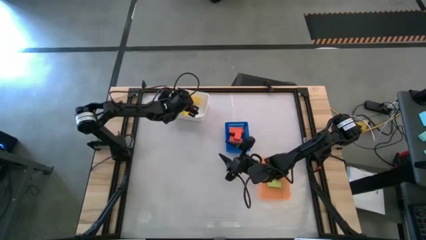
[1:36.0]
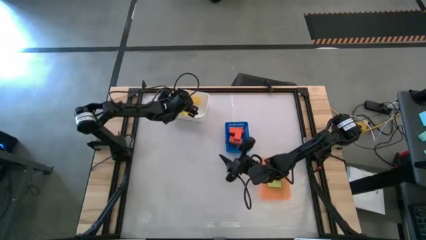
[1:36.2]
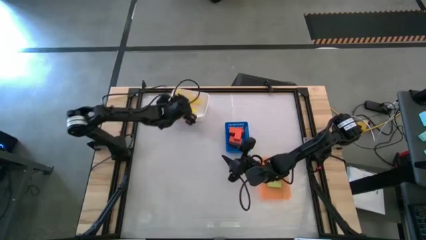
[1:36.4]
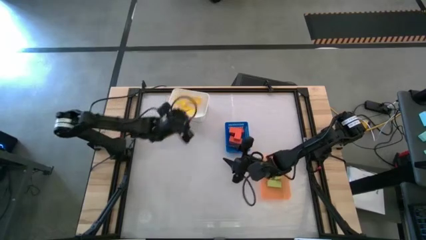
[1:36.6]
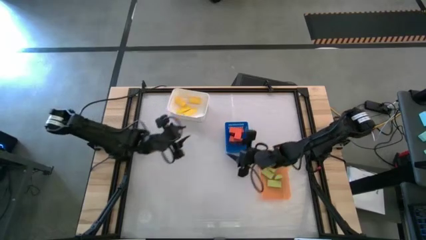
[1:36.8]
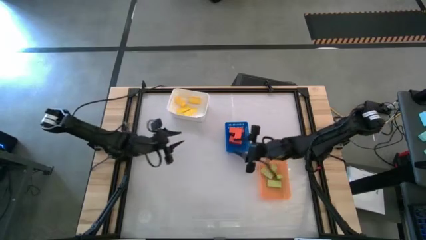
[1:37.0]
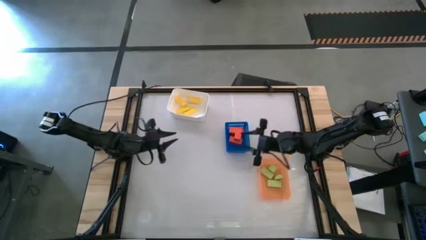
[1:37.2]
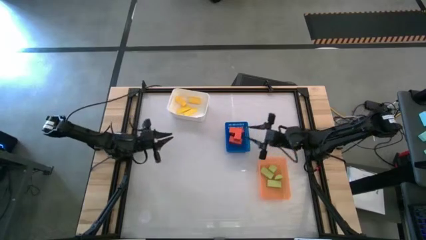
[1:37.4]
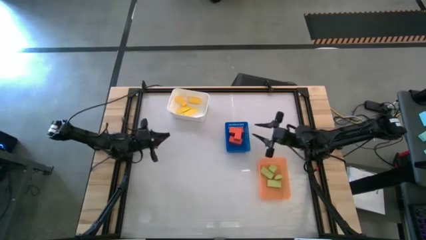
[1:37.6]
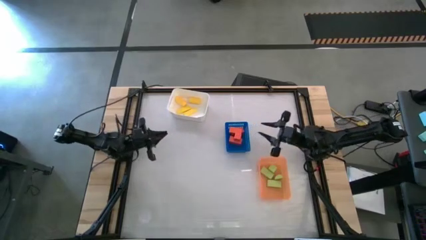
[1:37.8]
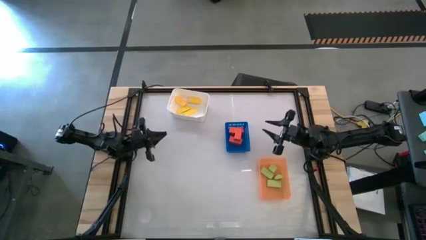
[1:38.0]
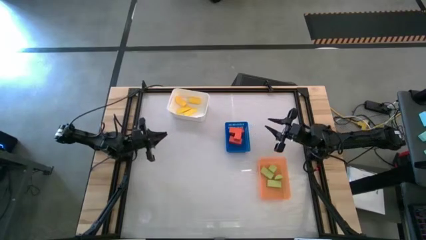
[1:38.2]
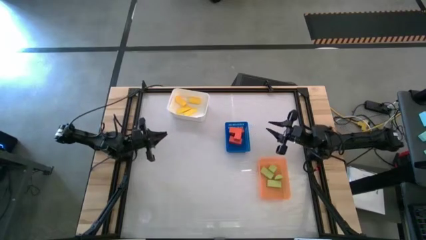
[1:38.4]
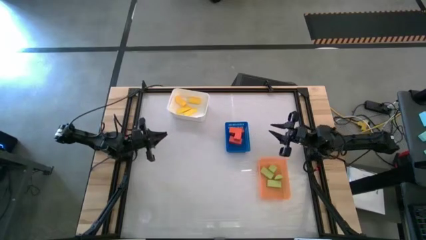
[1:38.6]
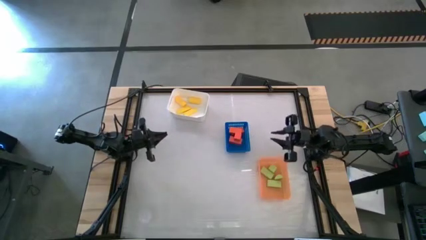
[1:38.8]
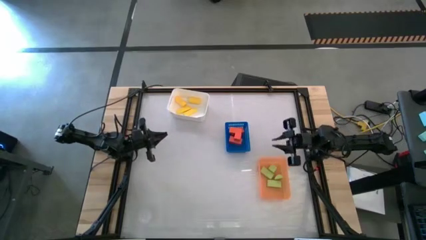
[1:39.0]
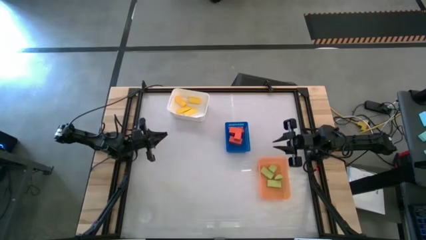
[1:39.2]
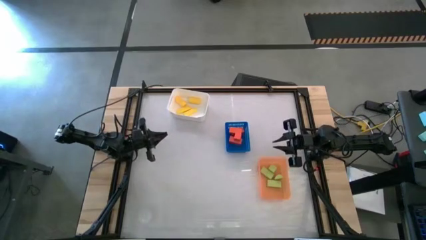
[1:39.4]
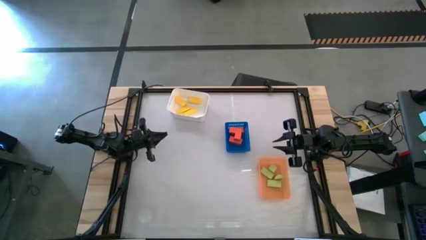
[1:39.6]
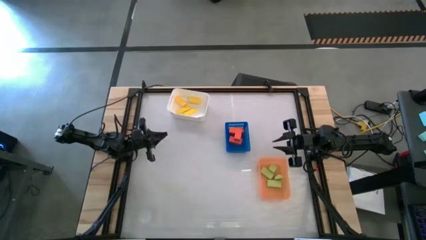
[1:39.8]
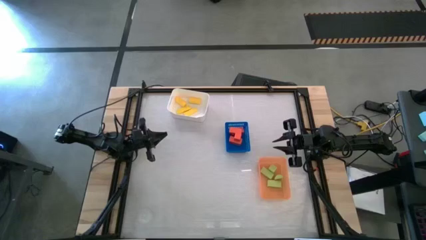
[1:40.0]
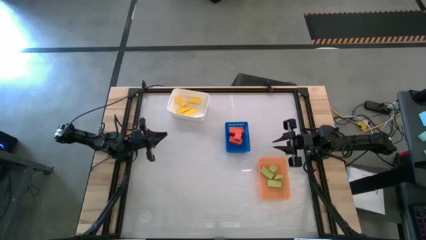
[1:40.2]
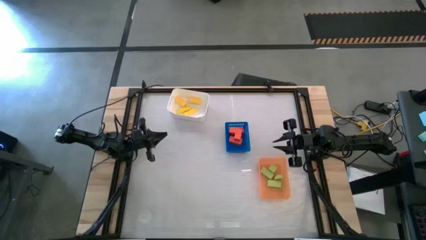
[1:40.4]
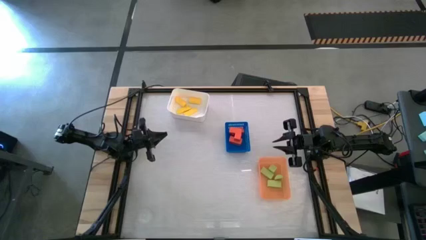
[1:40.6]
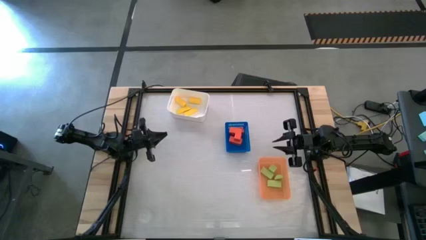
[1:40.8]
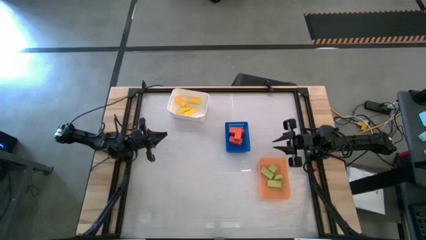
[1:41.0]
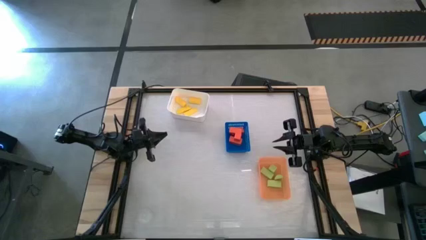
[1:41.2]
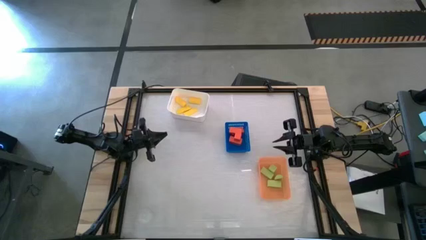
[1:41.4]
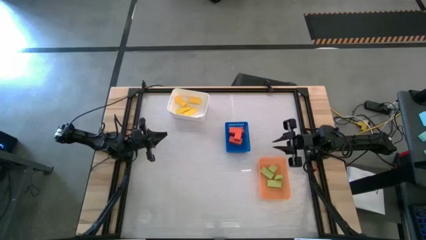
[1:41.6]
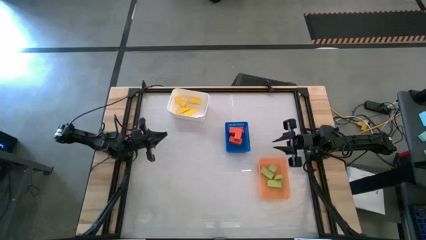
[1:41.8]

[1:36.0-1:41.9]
Task: Sort & place blocks by color
Return to Home Position

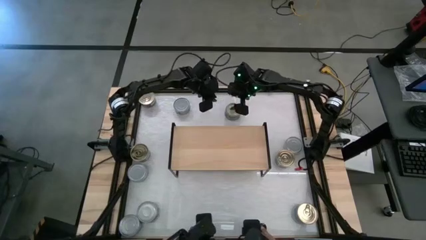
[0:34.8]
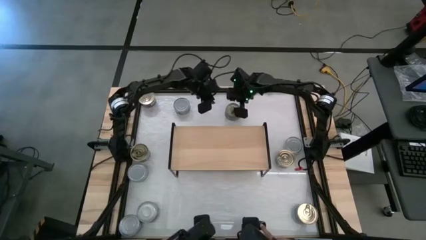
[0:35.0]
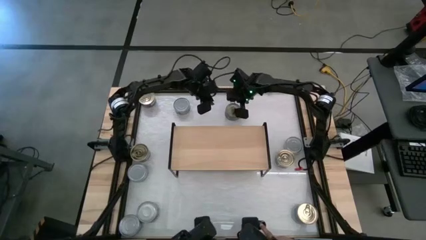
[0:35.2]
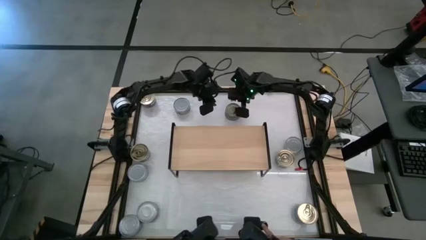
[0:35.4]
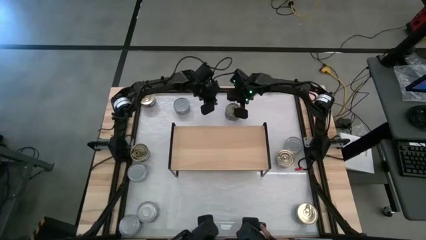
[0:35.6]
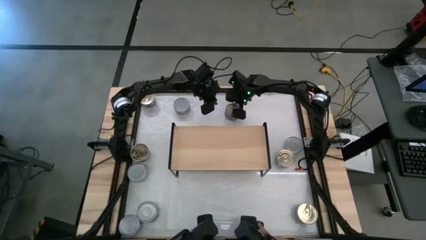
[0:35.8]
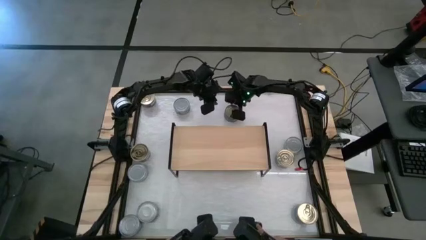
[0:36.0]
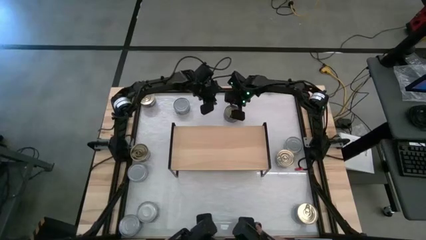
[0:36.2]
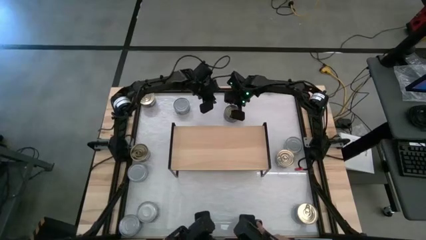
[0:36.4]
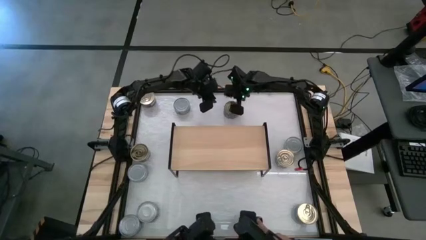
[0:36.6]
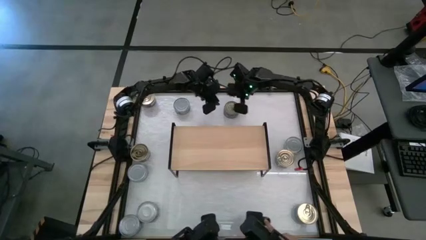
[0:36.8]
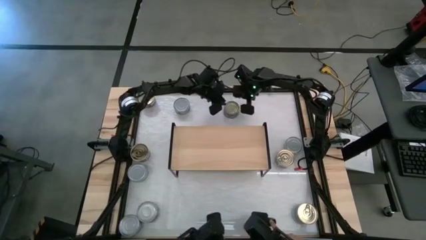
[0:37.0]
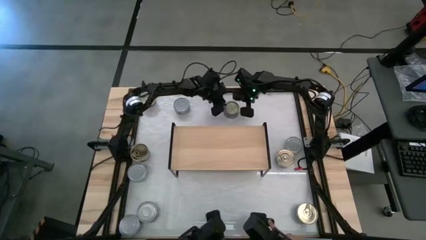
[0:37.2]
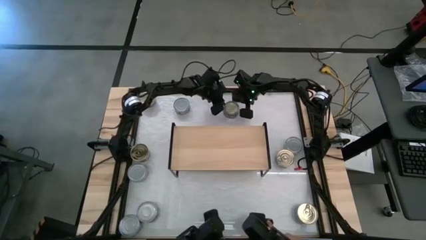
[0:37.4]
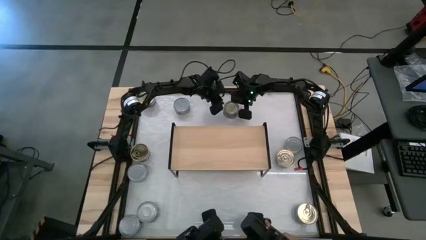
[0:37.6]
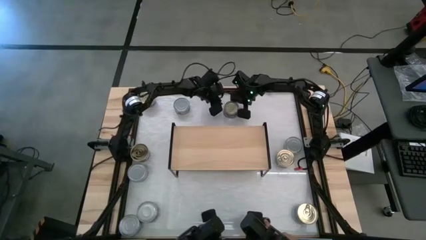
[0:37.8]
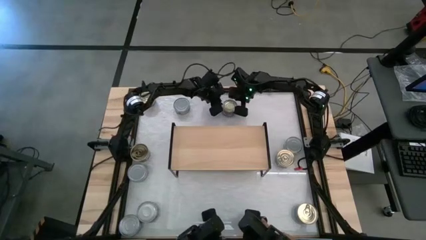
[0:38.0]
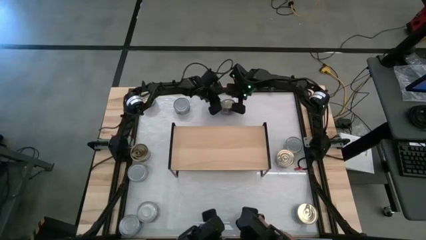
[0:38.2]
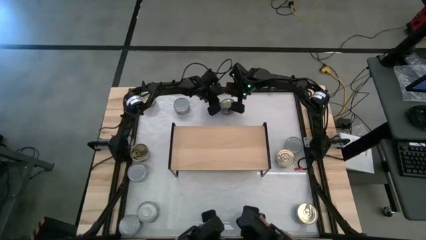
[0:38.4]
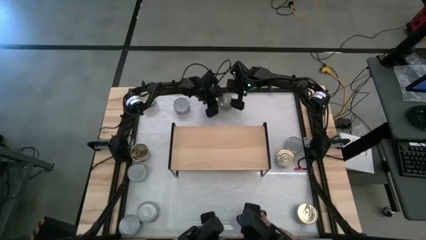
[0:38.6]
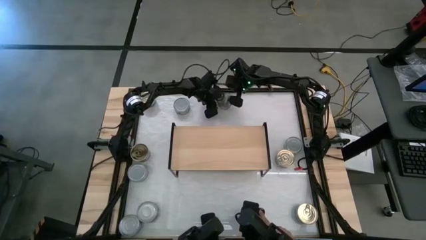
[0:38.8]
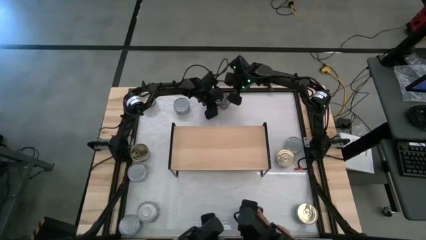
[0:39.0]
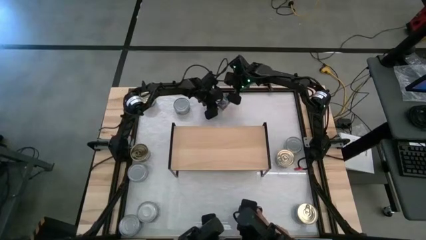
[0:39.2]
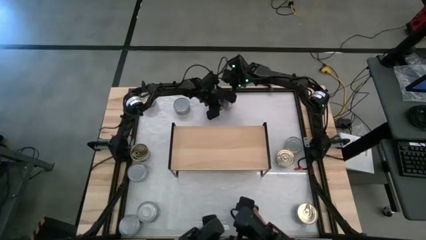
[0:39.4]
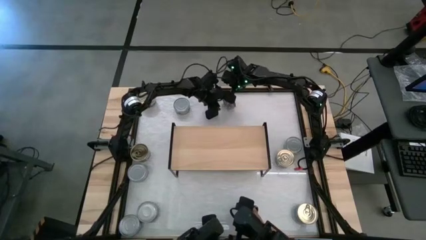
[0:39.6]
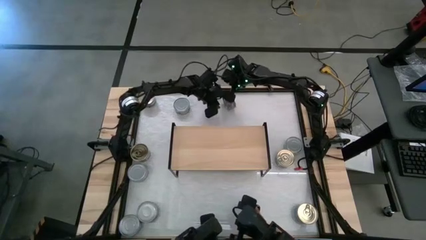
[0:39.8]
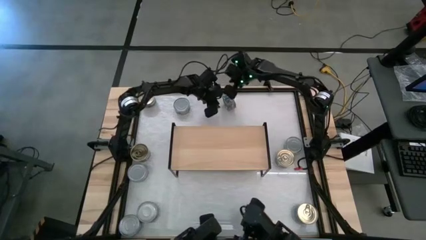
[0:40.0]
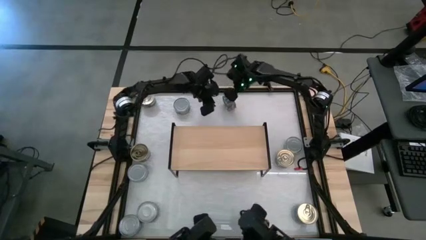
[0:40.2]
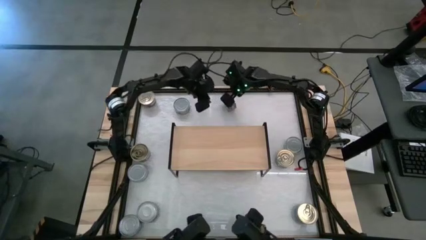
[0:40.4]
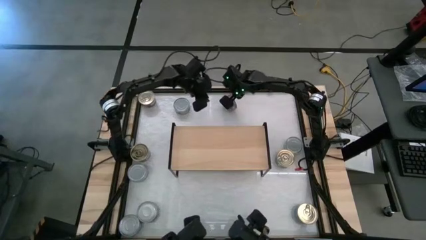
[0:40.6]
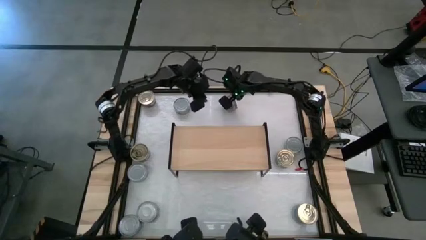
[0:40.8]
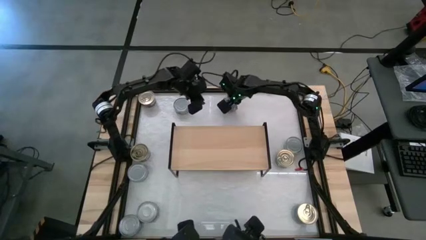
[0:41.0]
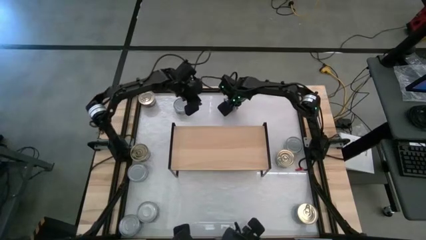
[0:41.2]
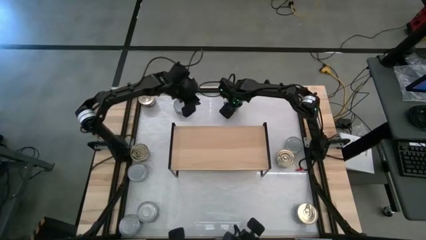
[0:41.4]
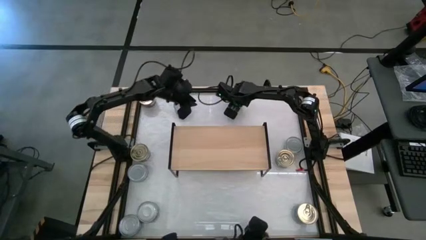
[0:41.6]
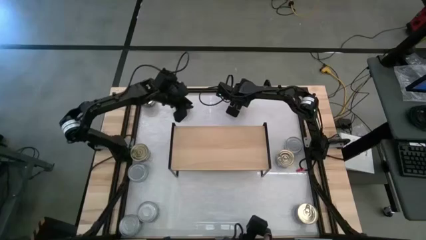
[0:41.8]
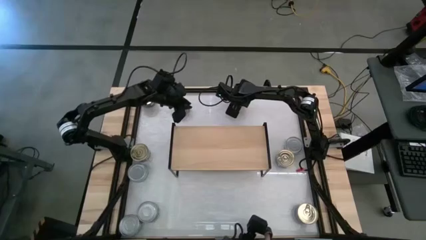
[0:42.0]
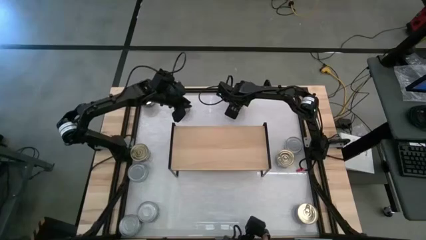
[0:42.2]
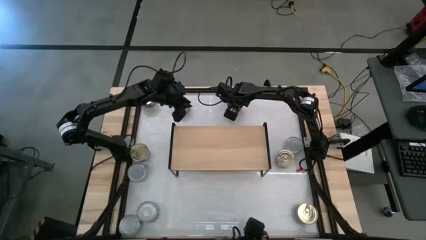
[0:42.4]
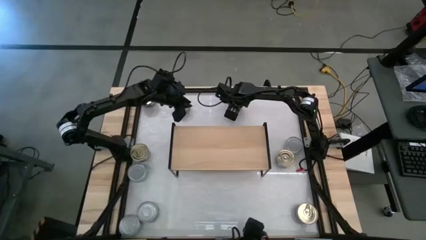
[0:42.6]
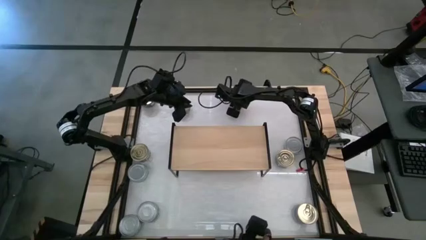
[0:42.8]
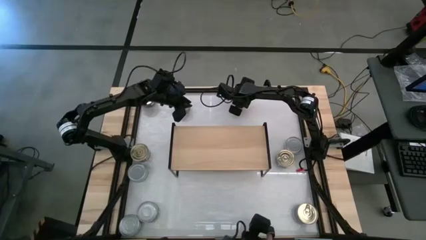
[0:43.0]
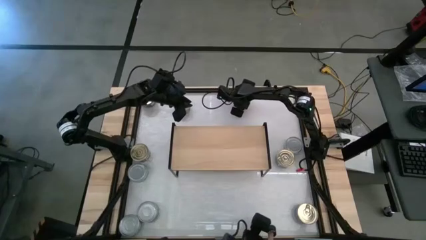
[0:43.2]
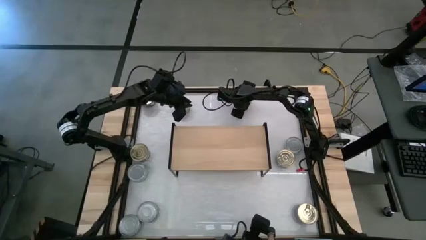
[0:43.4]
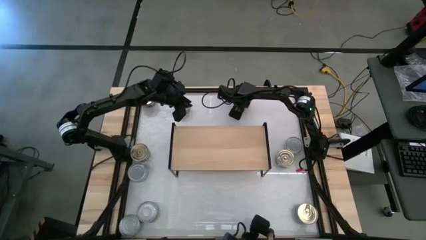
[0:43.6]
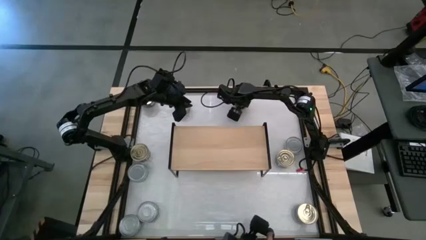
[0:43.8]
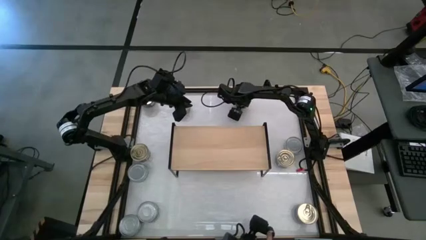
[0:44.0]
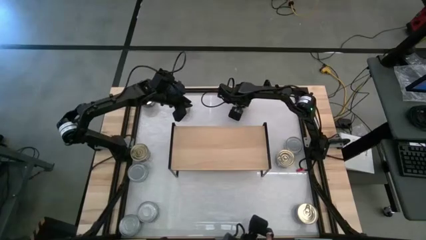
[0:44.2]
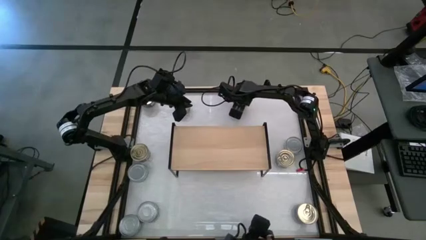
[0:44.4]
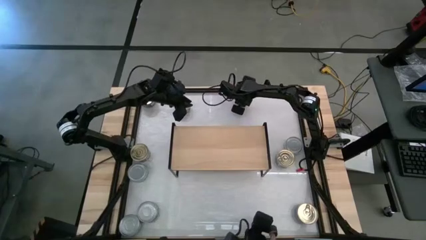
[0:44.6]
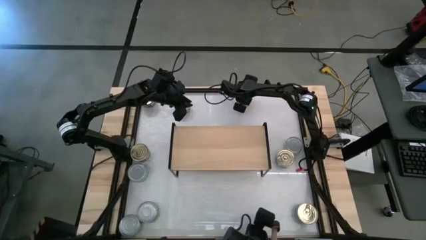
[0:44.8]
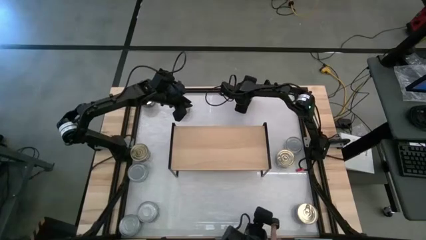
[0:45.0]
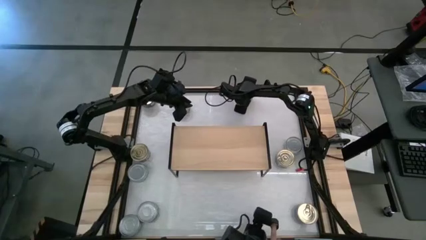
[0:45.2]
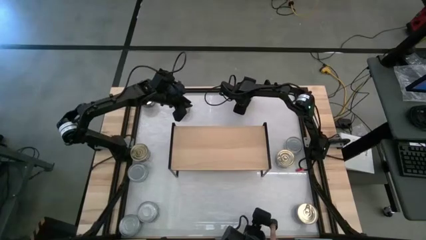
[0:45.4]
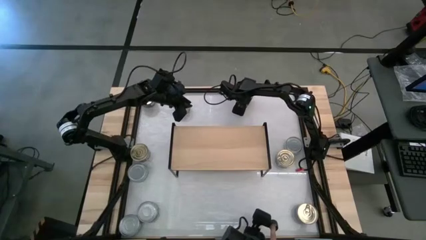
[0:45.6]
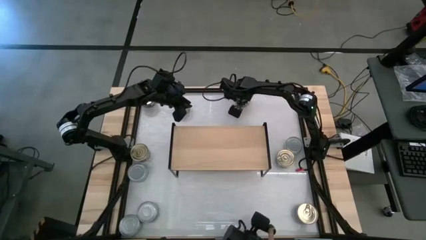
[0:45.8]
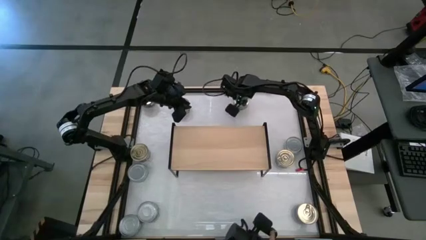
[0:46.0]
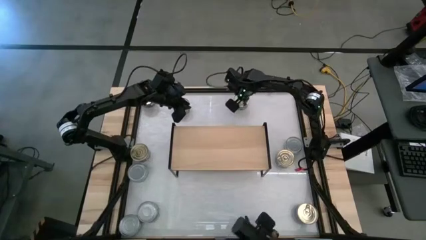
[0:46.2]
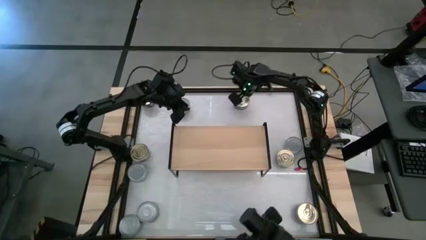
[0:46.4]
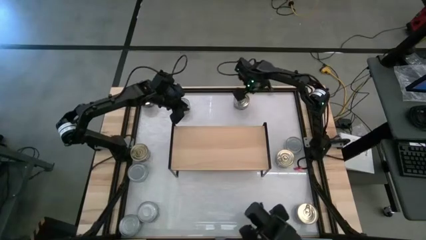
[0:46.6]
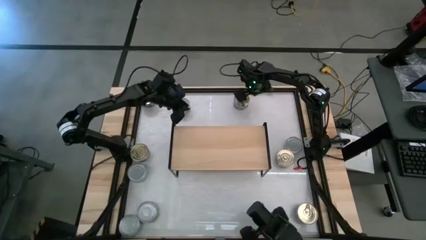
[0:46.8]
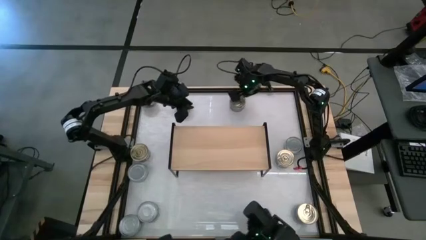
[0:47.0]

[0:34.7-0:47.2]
Task: Stack canned seafood by type on shelf
Put the blue-pink tuna can on the shelf
